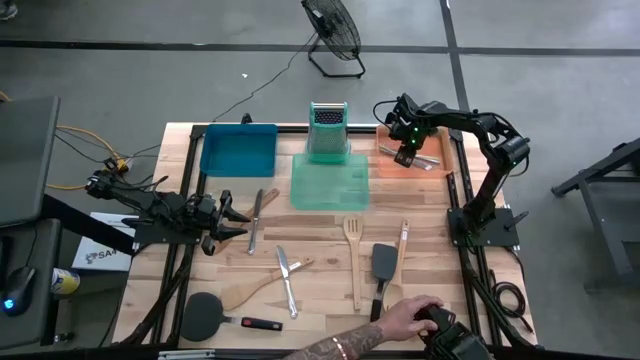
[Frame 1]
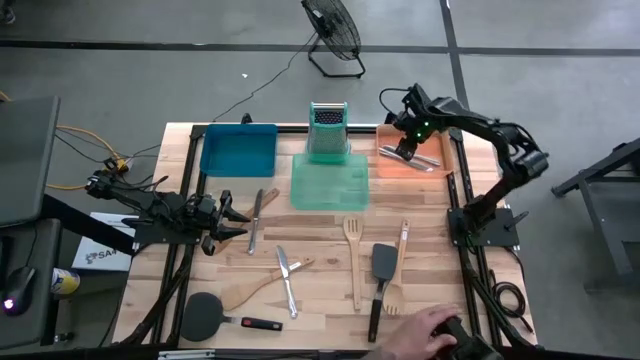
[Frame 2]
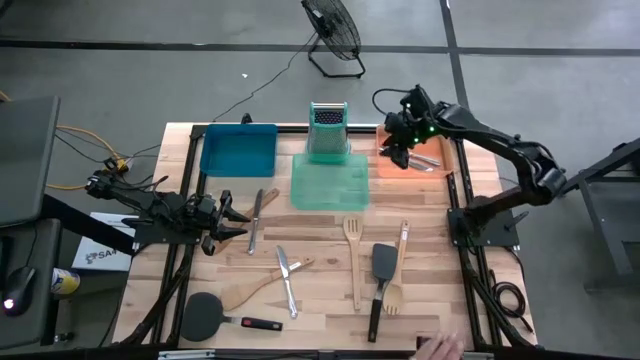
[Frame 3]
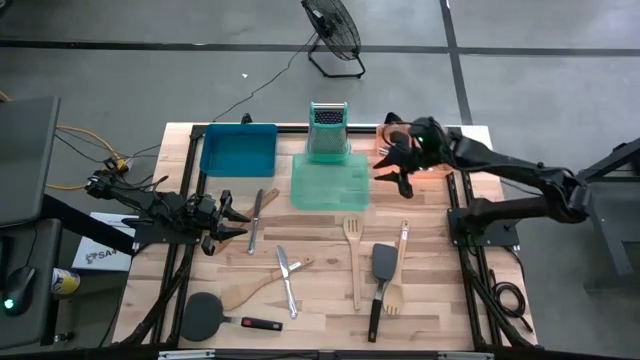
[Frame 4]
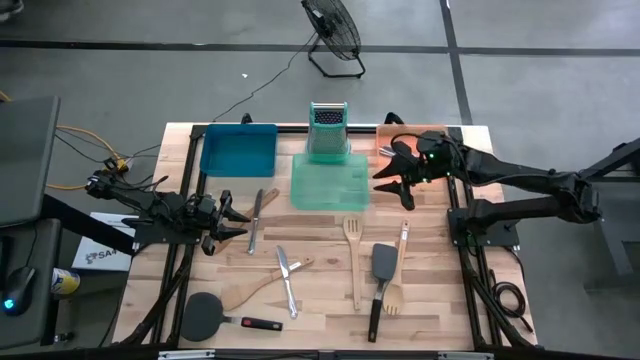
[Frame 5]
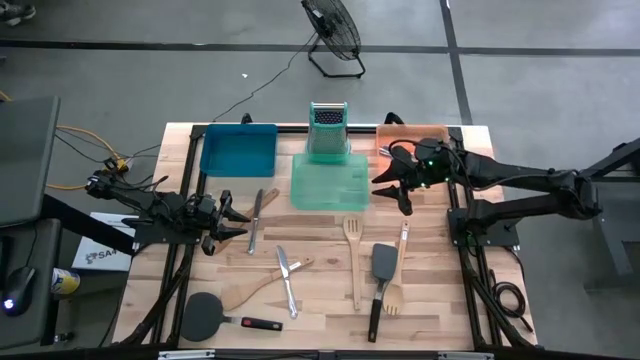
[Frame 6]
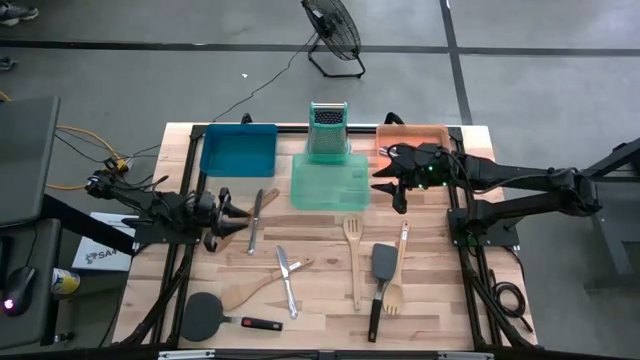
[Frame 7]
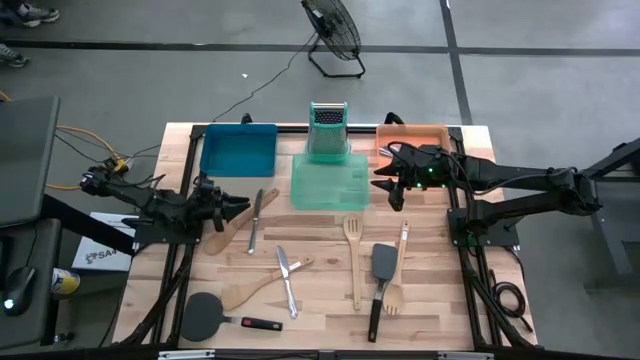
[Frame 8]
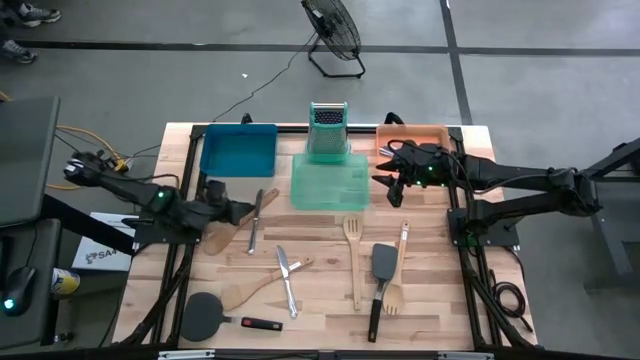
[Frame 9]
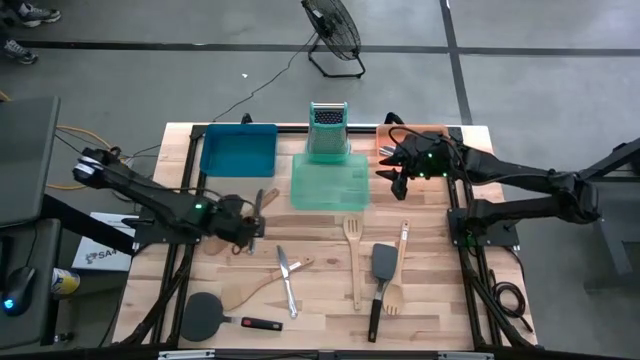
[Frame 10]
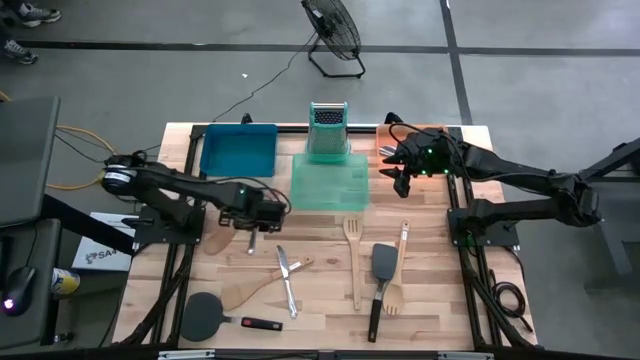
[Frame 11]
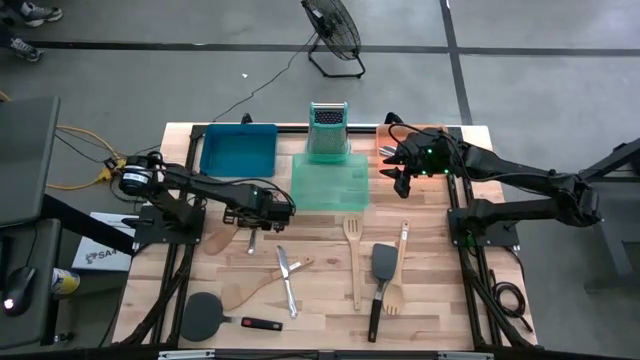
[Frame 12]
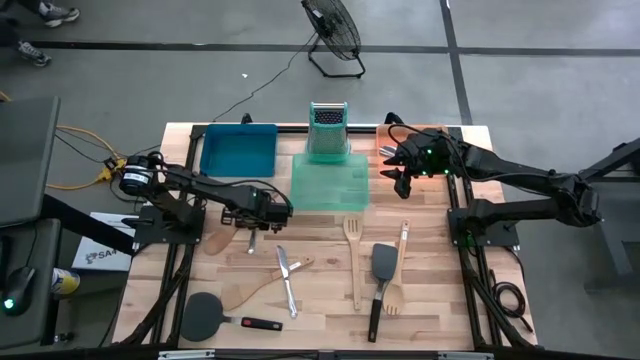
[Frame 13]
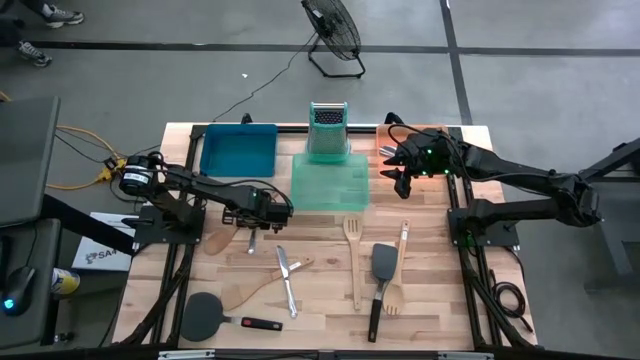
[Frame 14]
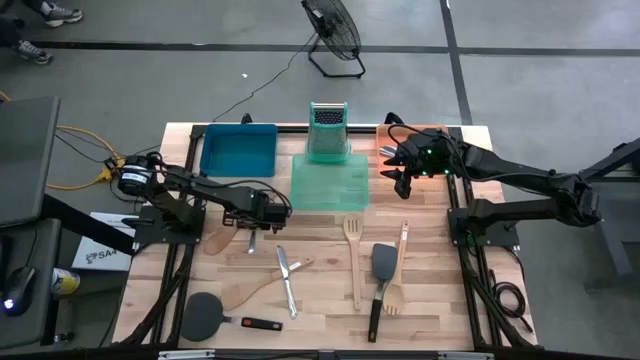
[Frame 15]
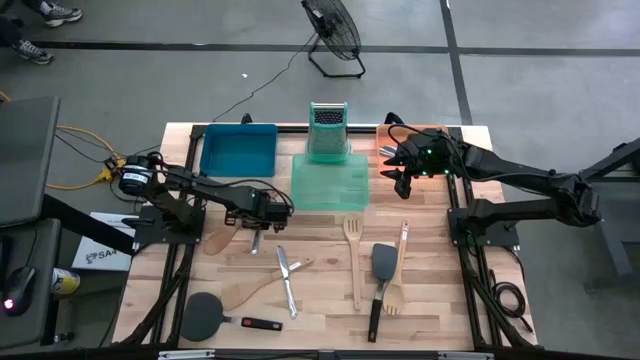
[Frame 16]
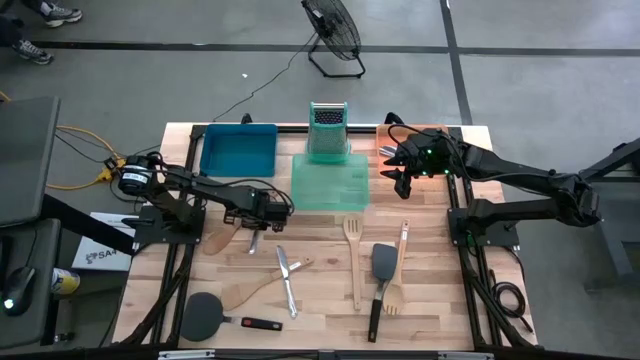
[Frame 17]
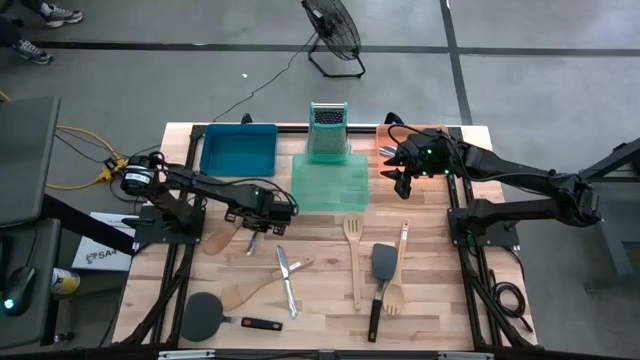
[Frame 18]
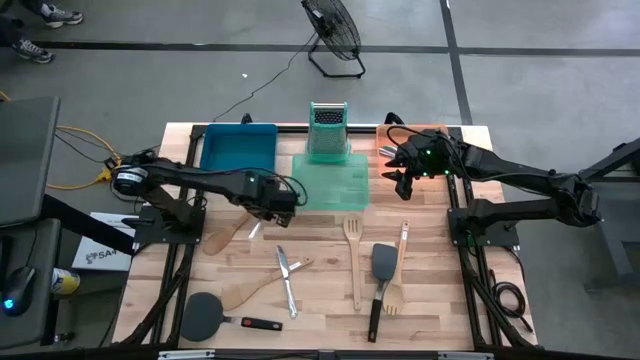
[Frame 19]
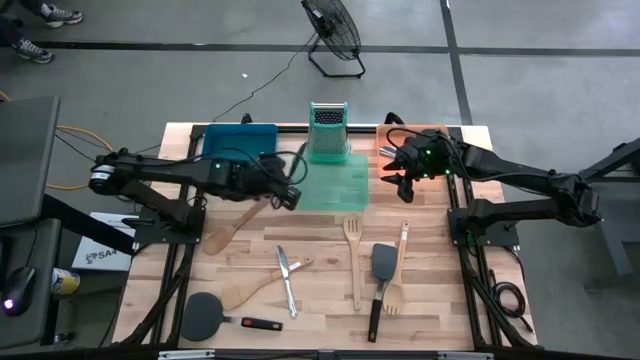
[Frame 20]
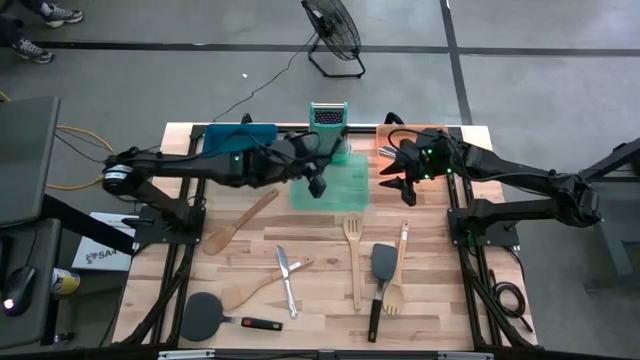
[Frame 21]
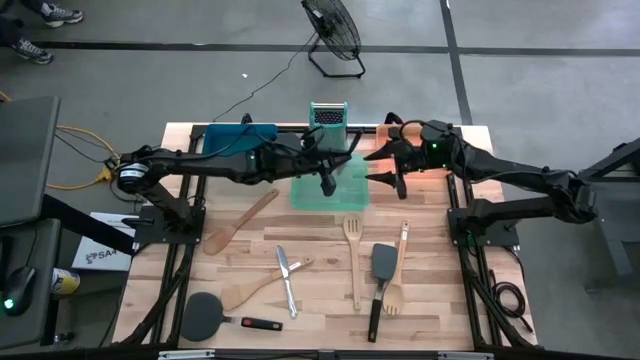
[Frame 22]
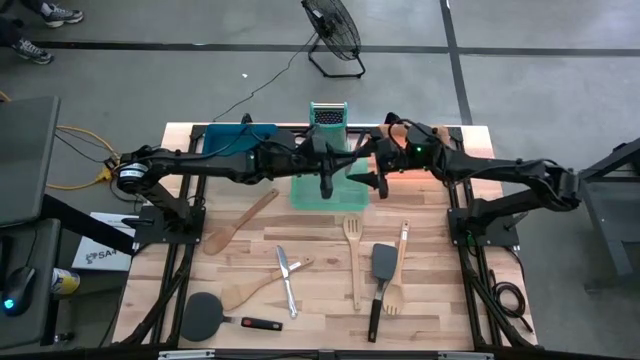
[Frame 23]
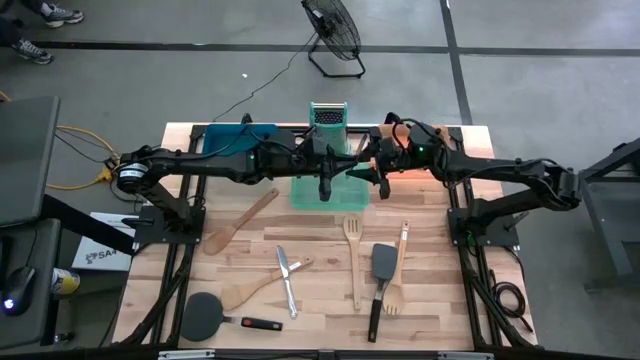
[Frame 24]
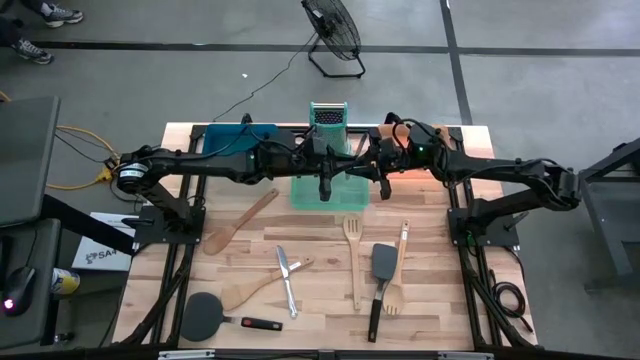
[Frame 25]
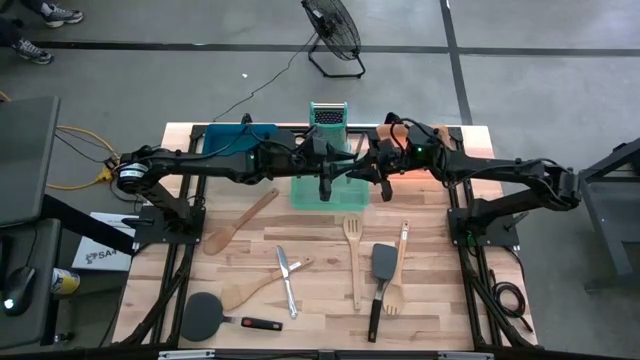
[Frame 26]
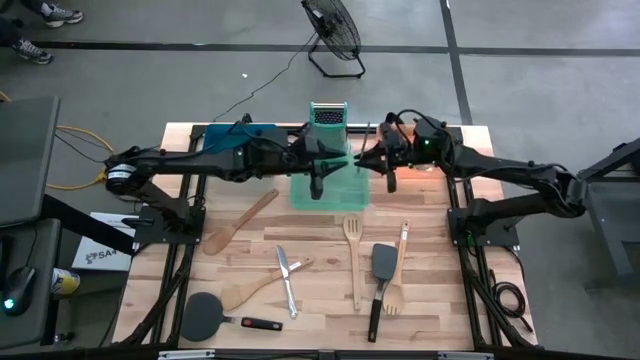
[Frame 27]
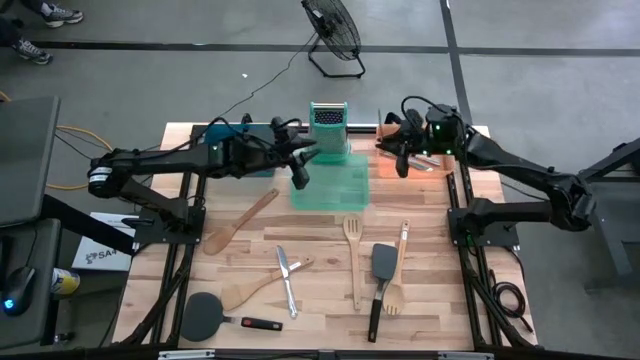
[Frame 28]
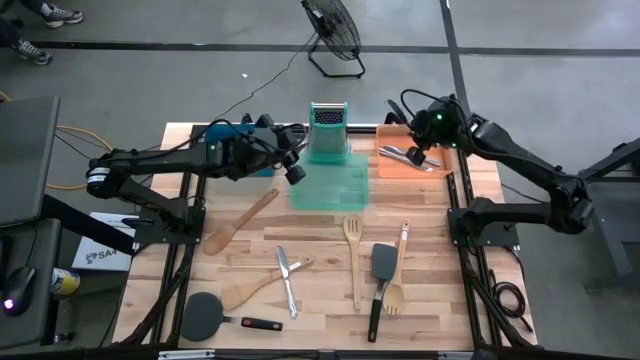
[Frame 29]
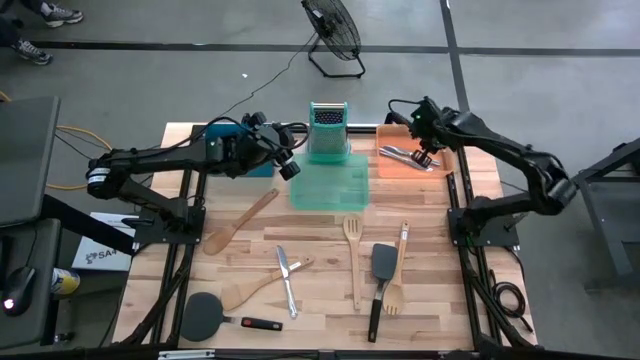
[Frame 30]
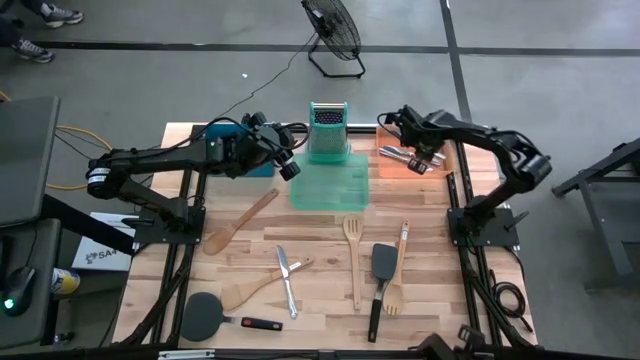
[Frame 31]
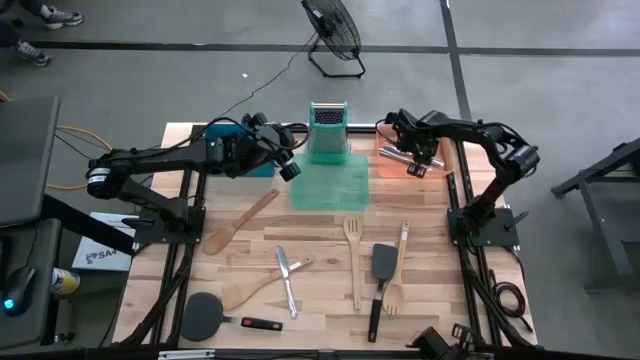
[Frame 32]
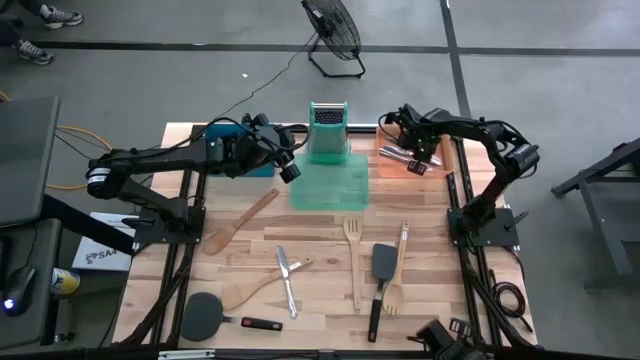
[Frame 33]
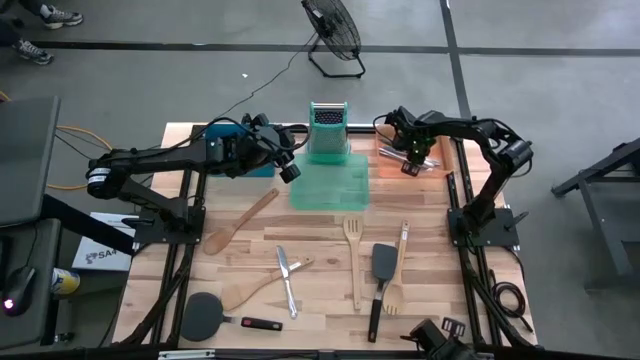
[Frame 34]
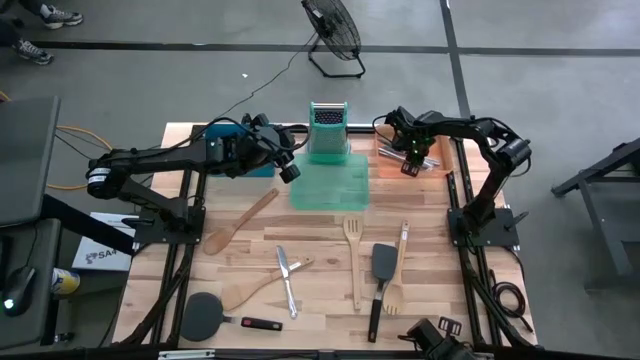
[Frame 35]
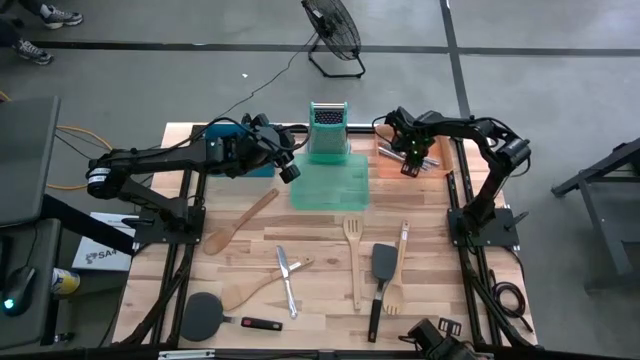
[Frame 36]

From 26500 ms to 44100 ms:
Task: Pick & Place Kitchen Items
Put the silver knife into the orange bin

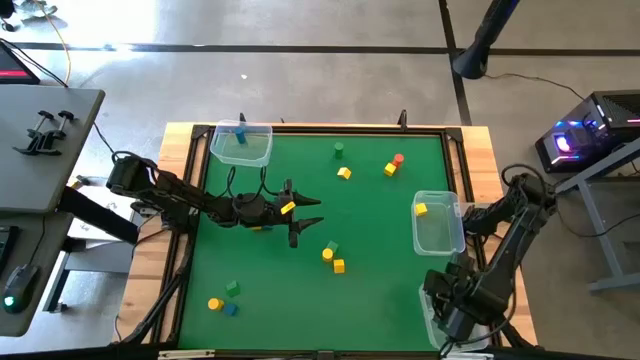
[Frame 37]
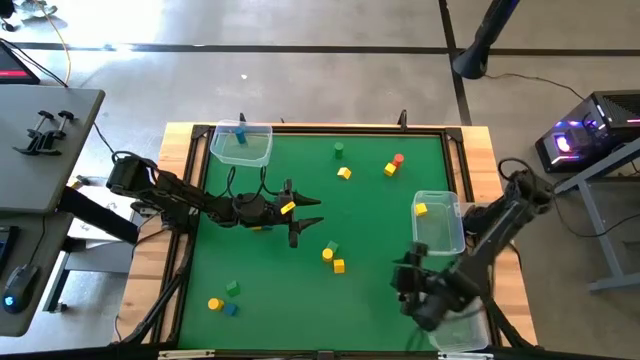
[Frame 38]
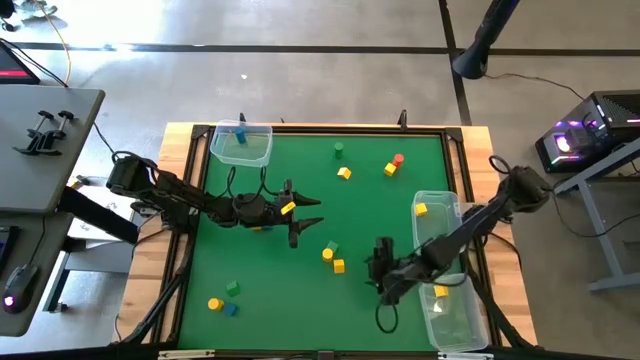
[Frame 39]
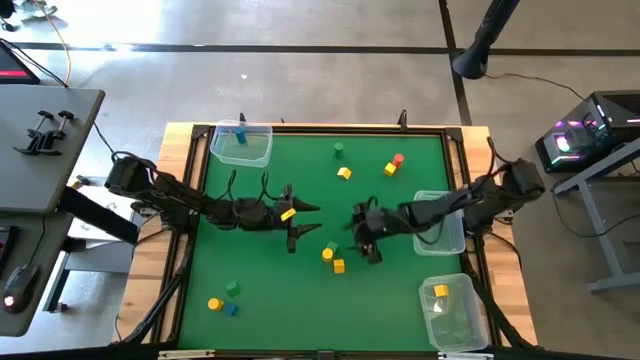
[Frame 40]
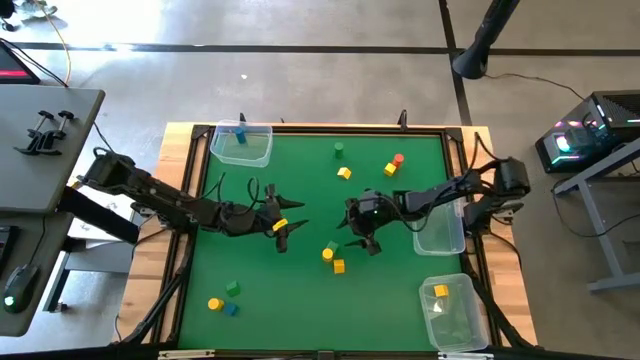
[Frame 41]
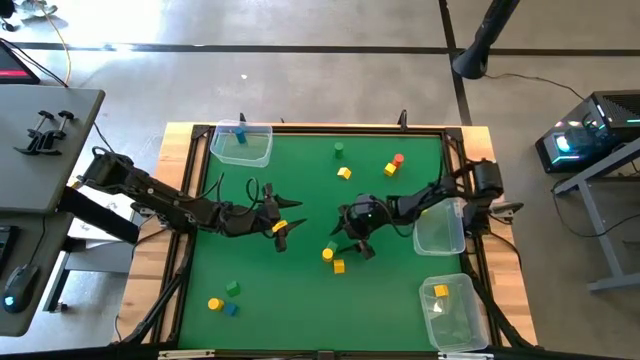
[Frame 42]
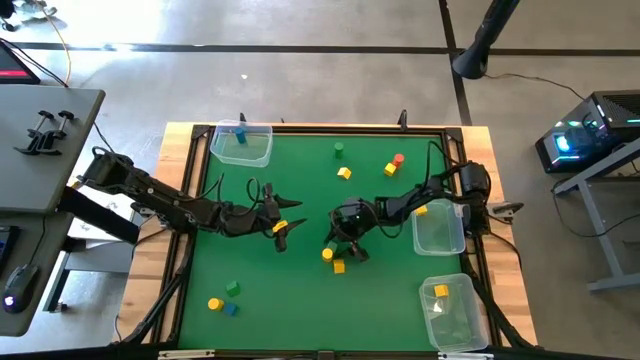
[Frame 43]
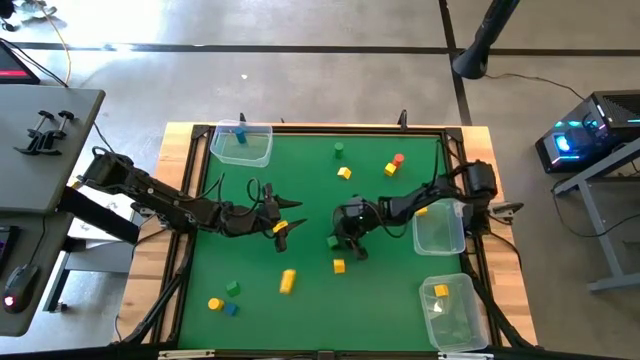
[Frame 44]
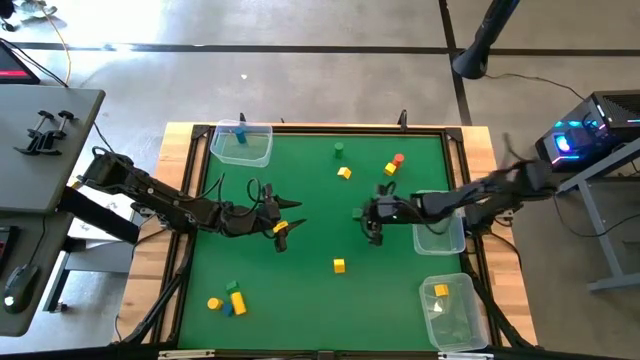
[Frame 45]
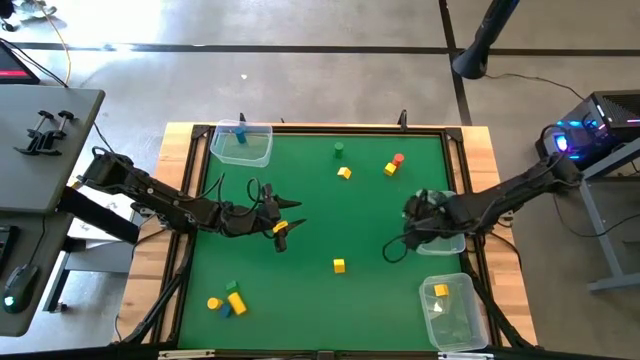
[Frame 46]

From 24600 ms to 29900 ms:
Task: Sort blocks by size
Put the green cube block into the middle transparent bin
